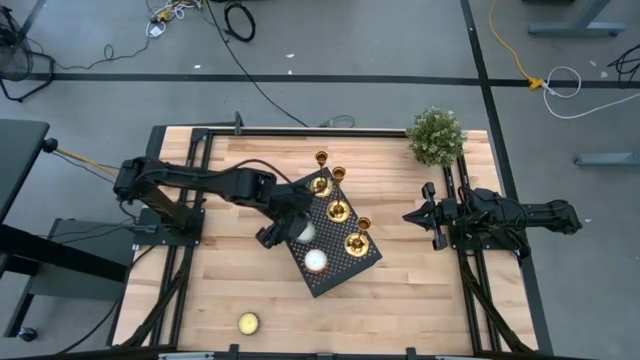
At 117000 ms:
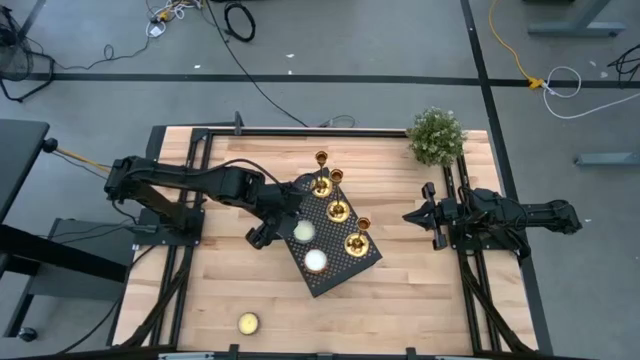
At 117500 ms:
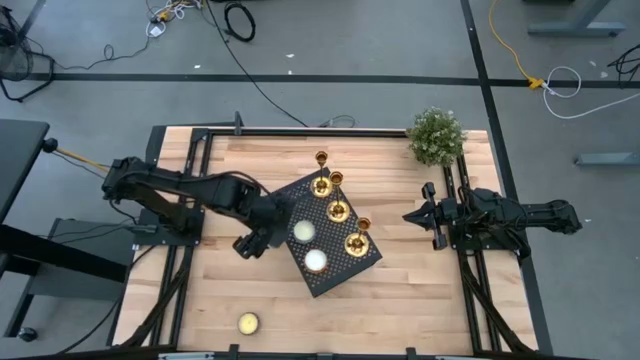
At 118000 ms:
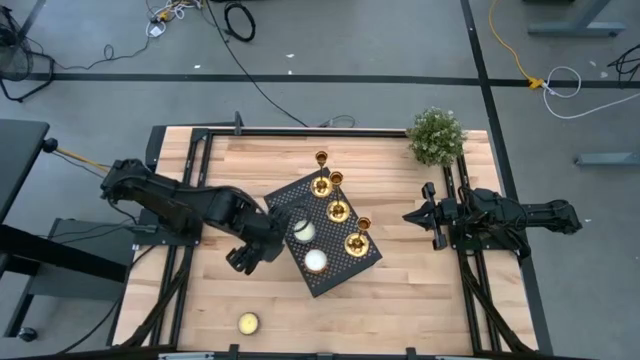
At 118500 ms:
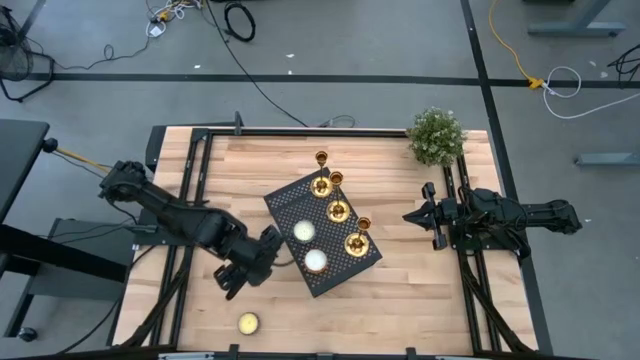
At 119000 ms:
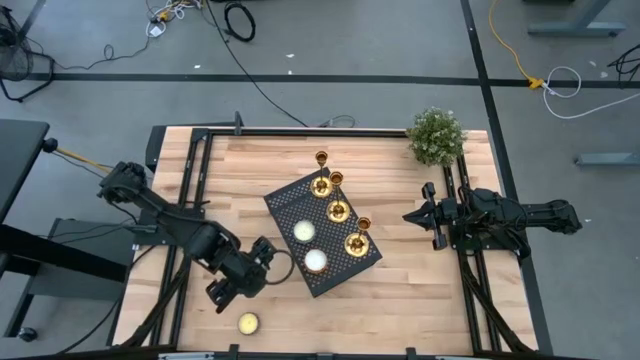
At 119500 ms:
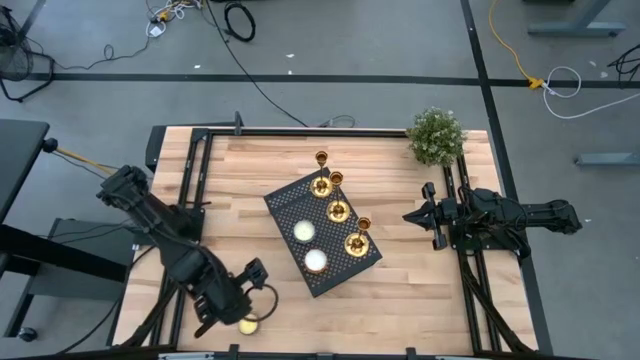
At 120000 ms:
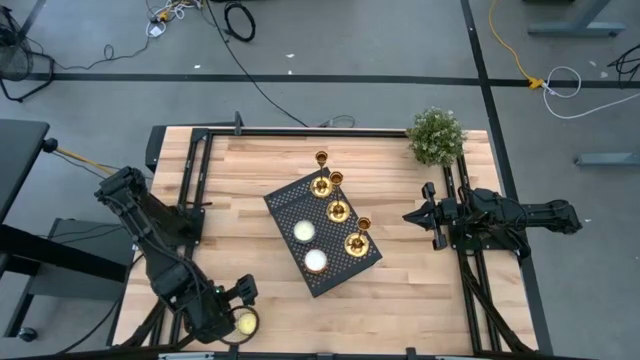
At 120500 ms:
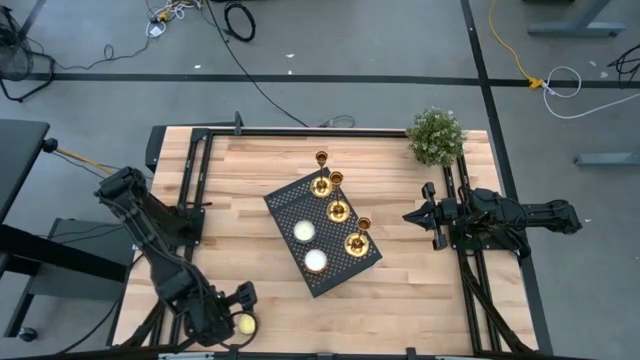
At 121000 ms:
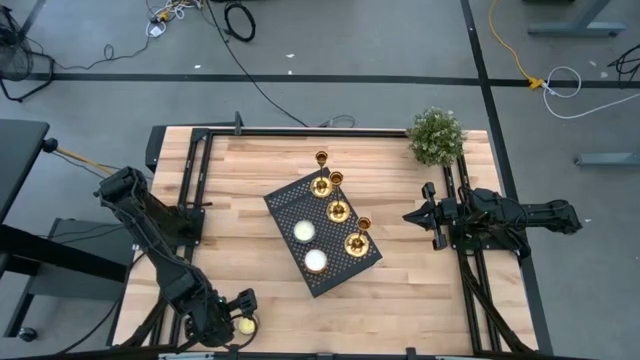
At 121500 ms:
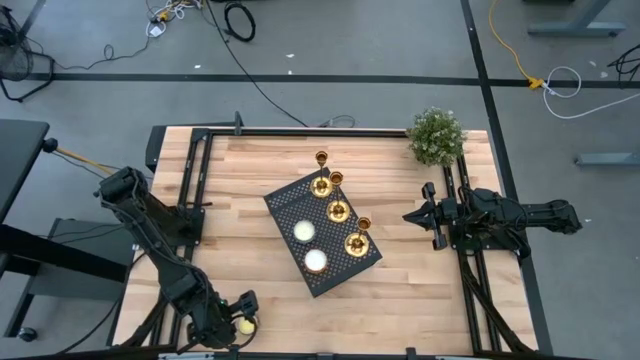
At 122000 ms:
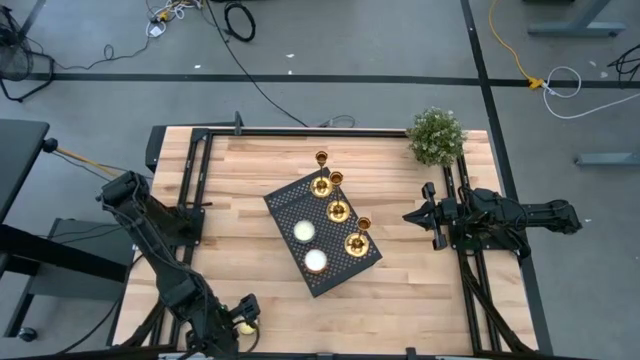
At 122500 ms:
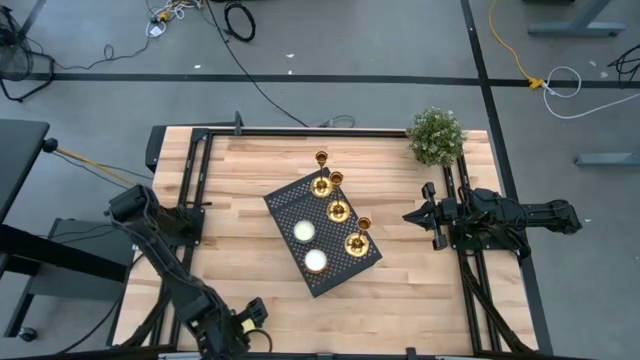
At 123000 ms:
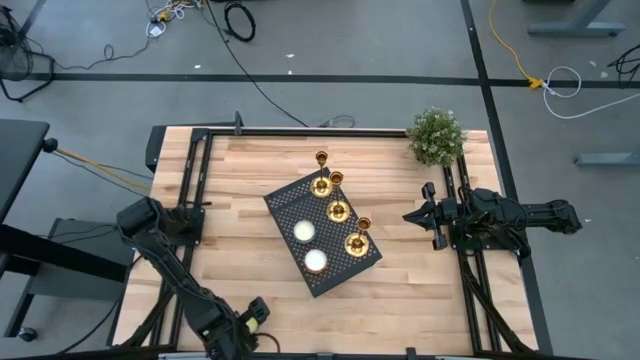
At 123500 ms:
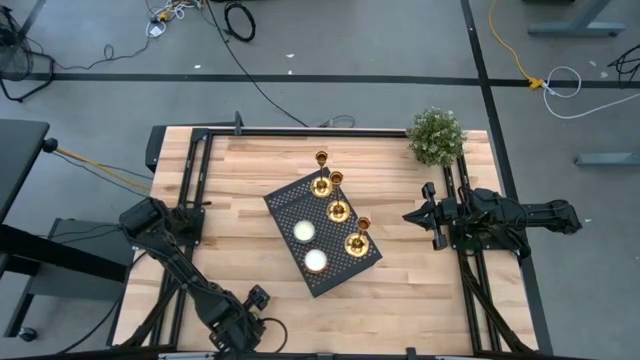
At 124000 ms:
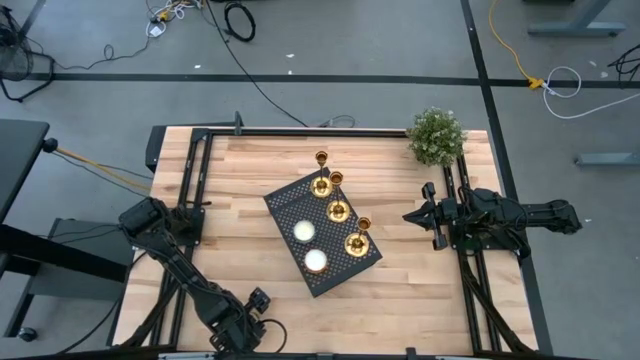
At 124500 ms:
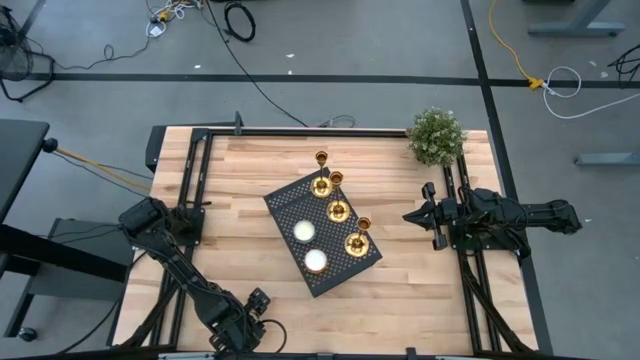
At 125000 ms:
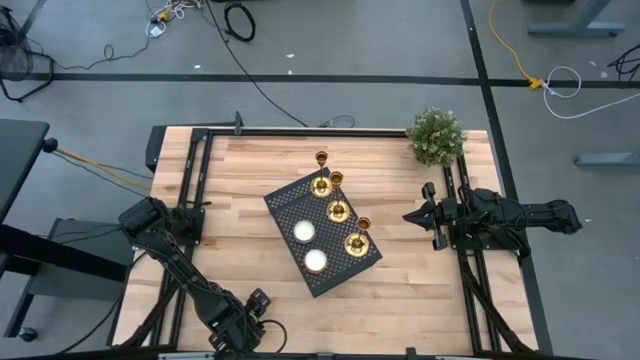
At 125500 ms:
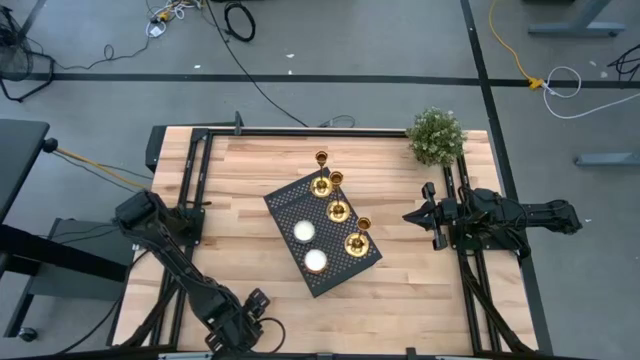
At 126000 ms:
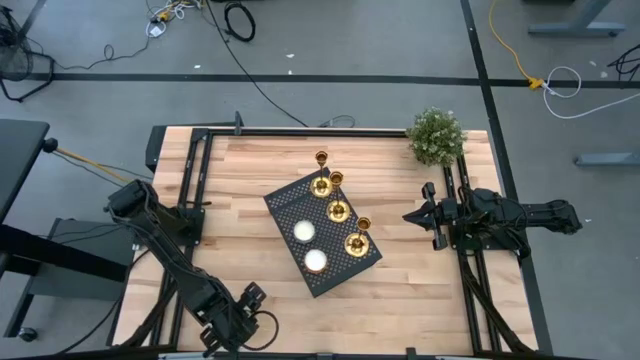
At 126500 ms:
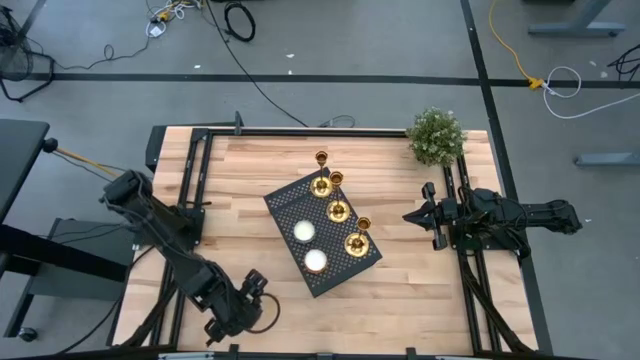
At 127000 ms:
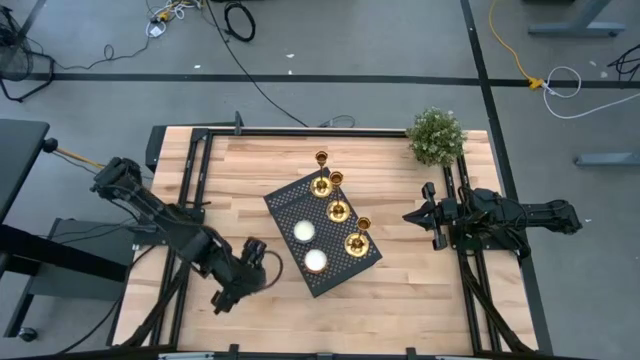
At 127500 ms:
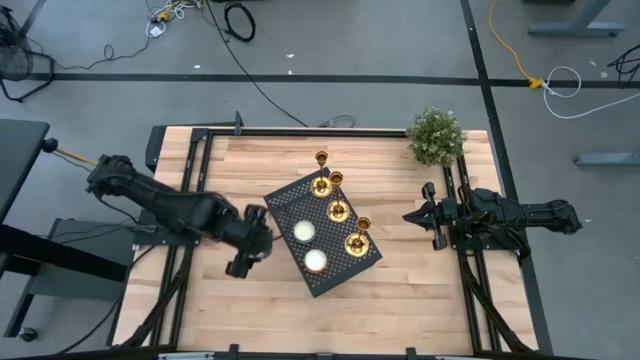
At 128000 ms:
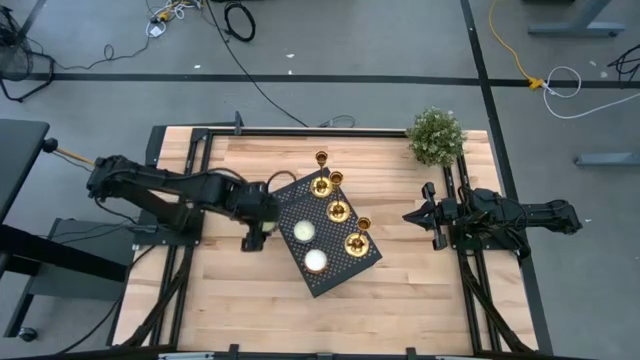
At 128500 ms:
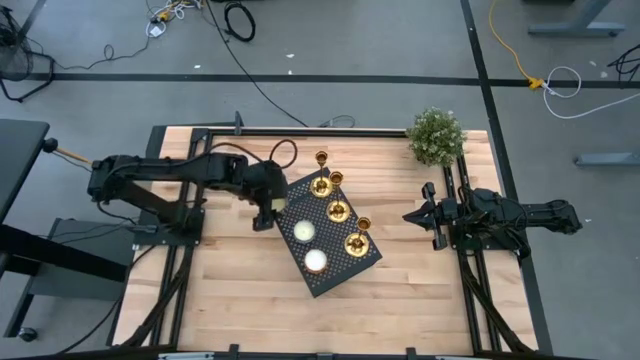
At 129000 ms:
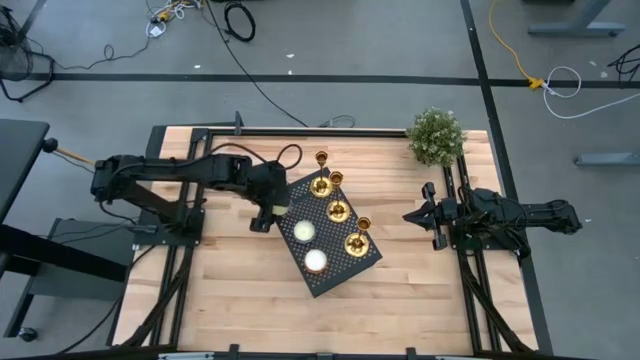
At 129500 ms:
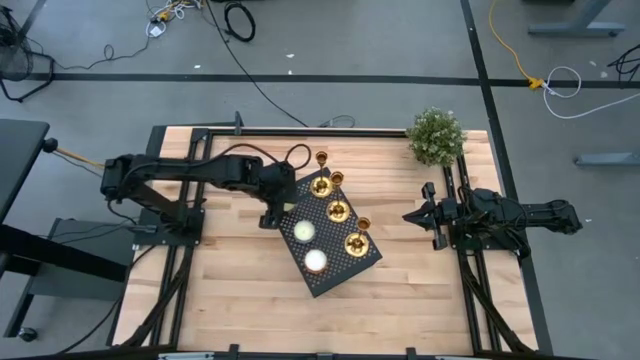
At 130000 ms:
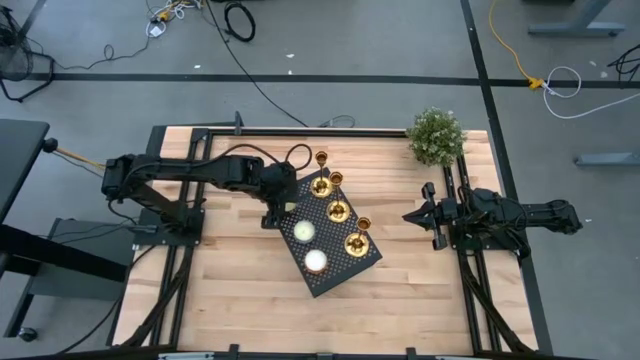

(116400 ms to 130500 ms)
Task: Pick & Place candle stick holders
Put the red and black scented candle on the shelf aligned with the other scented candles

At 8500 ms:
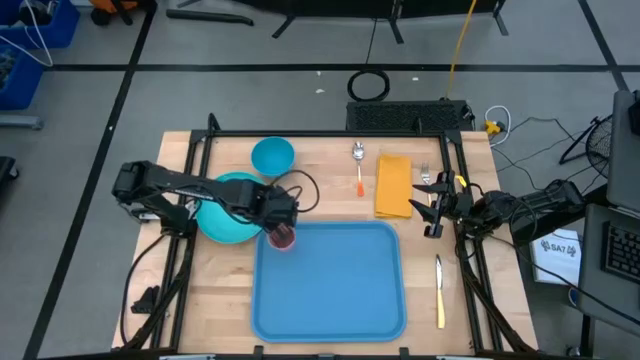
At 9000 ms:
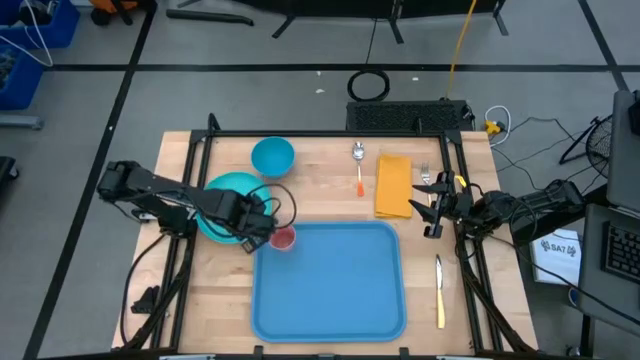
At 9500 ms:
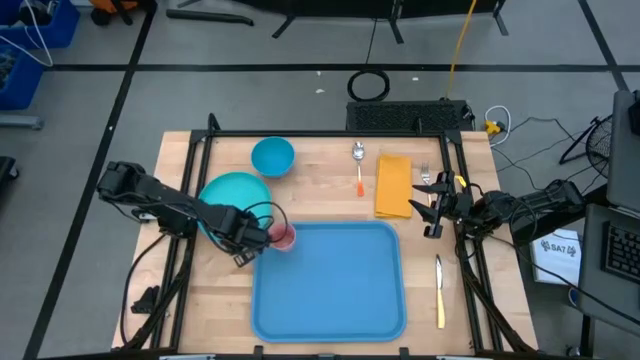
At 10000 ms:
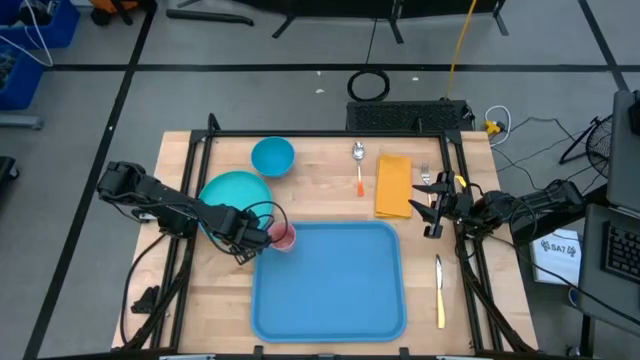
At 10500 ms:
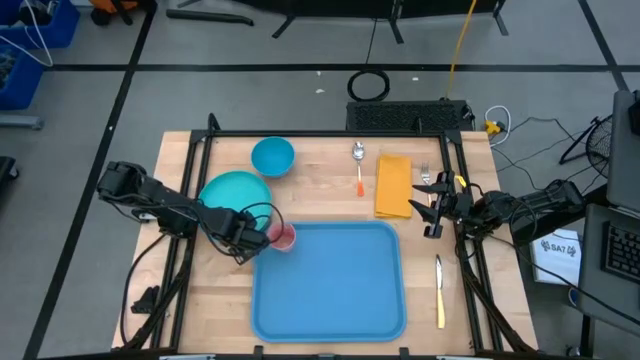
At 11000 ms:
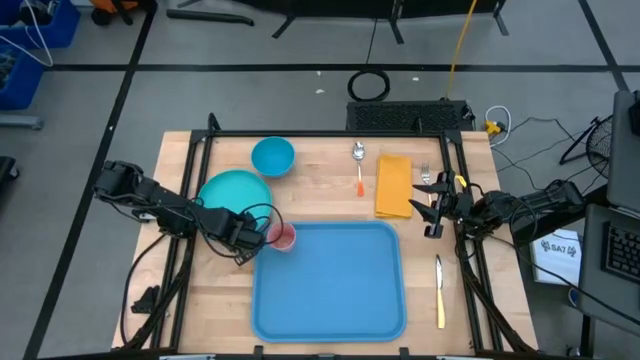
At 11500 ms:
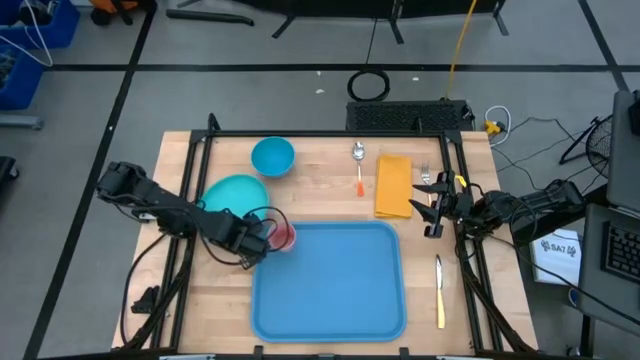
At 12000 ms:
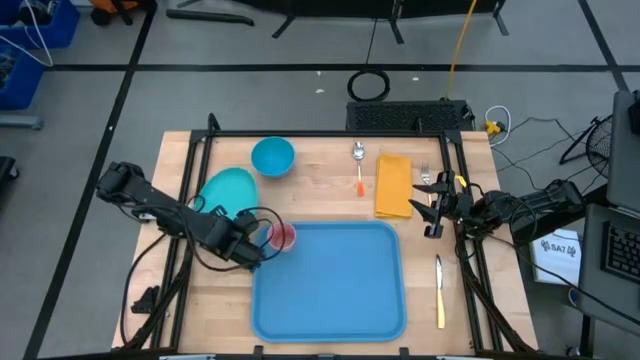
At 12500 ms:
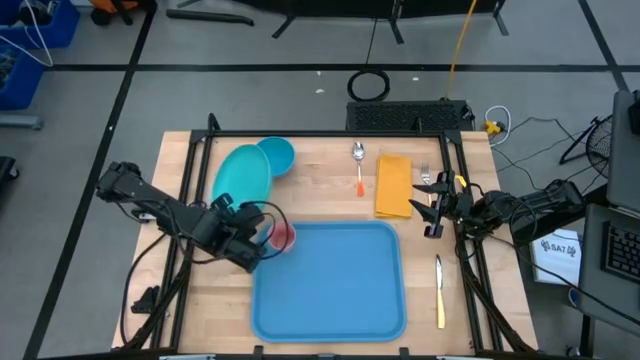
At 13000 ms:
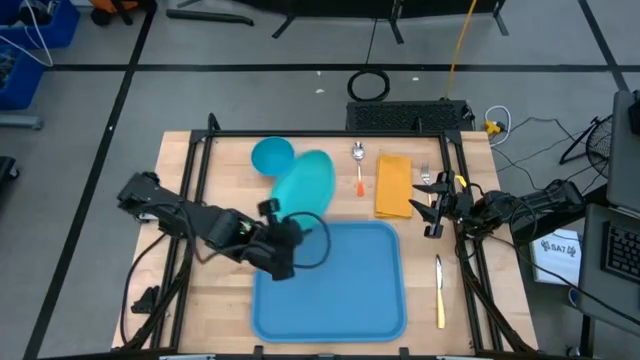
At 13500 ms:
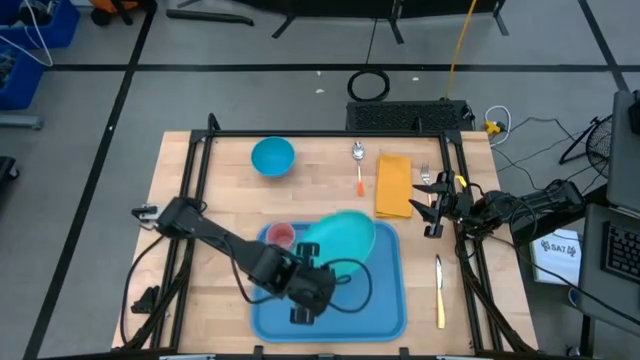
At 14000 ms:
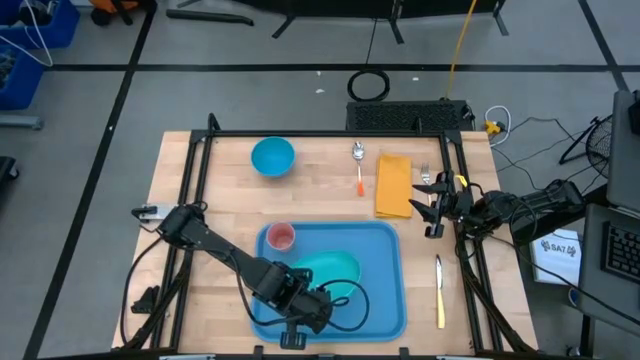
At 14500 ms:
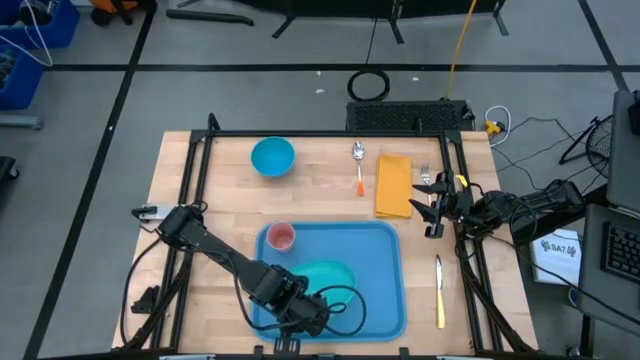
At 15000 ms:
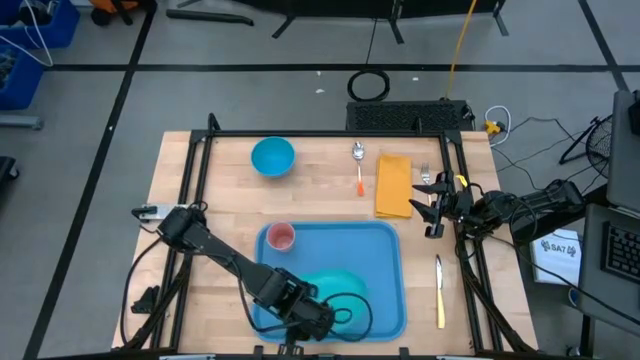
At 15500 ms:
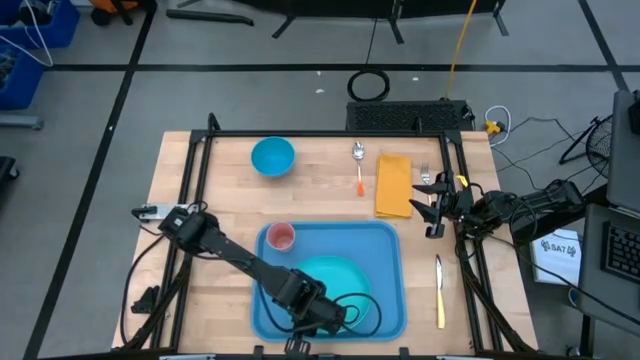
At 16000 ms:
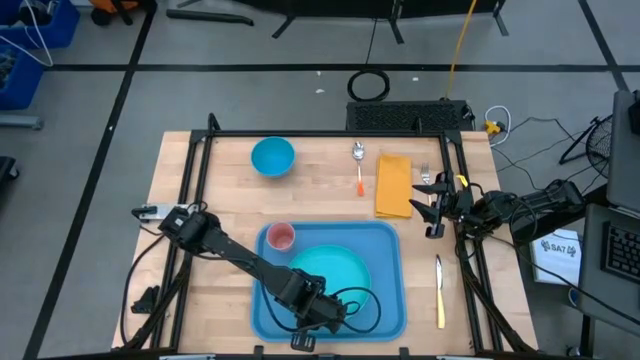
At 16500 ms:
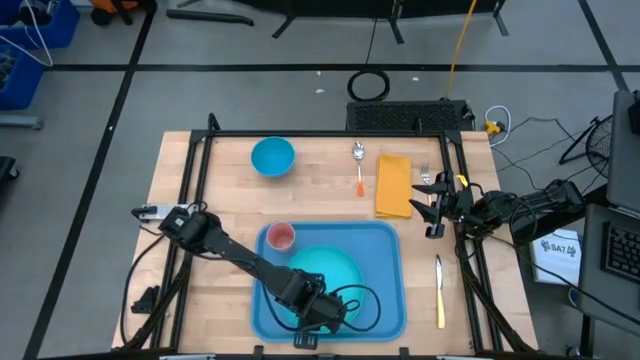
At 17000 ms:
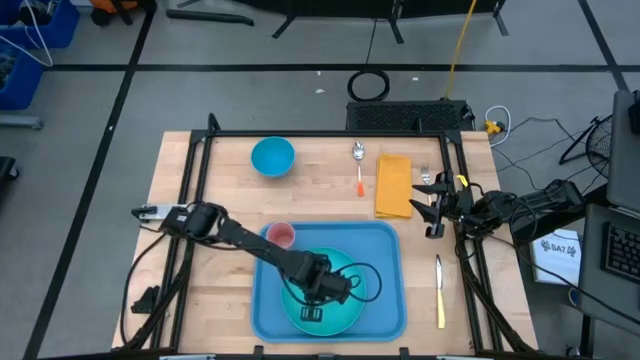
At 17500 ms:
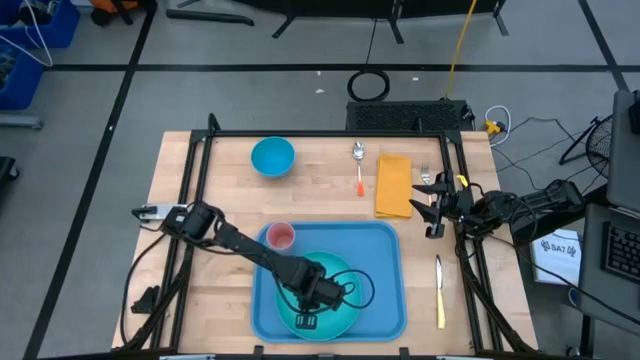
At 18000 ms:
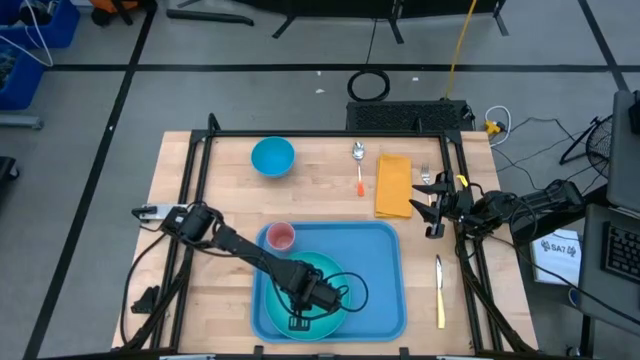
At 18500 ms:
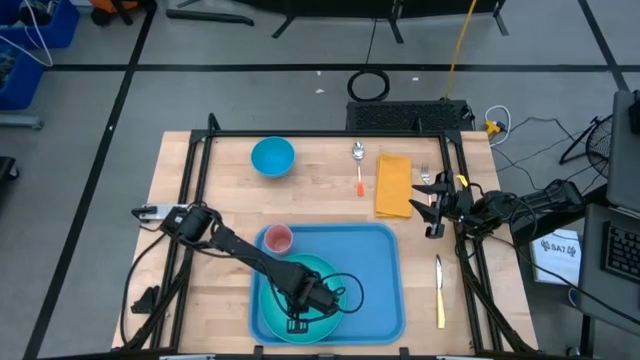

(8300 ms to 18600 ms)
Task: Set up tray
Put the light blue plate on the blue tray to the bottom right of the pink cup
